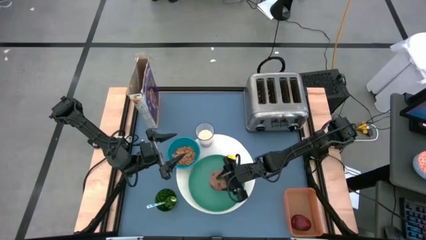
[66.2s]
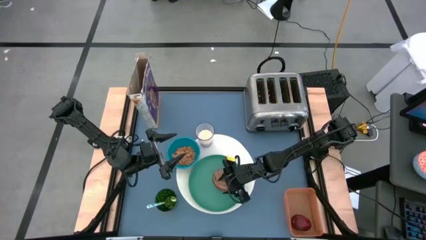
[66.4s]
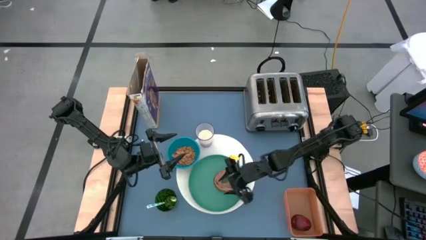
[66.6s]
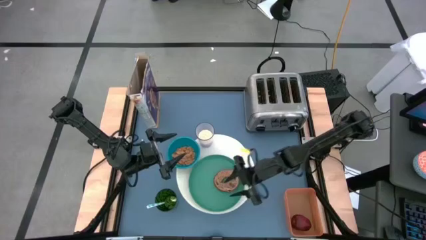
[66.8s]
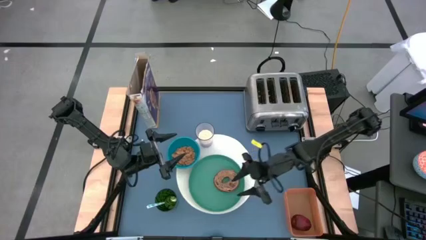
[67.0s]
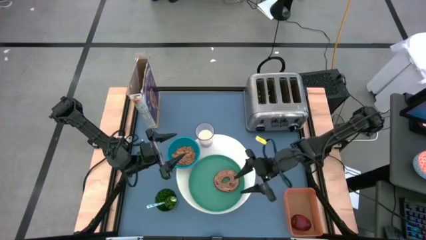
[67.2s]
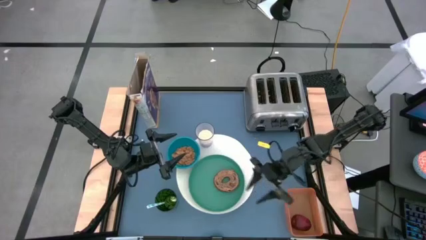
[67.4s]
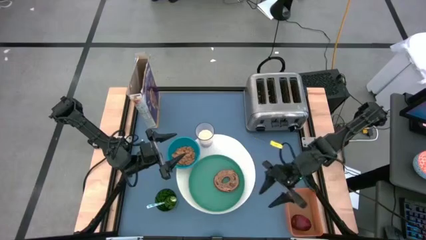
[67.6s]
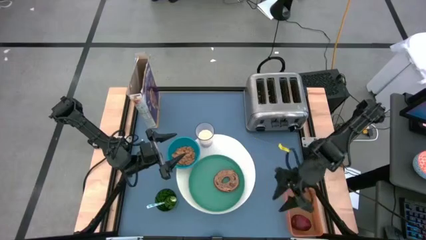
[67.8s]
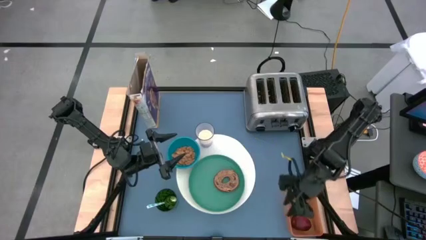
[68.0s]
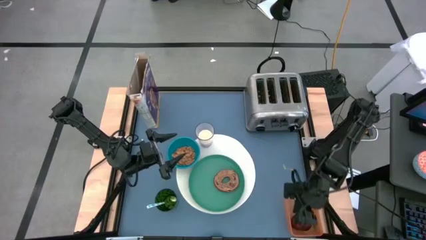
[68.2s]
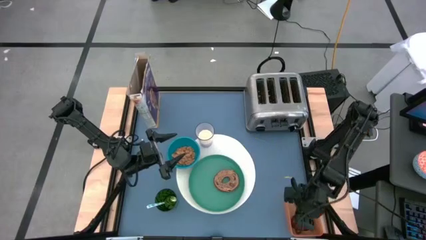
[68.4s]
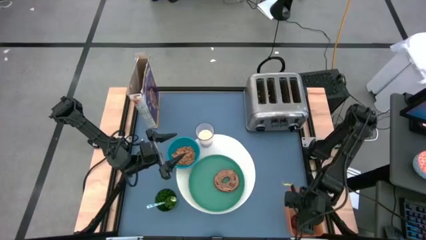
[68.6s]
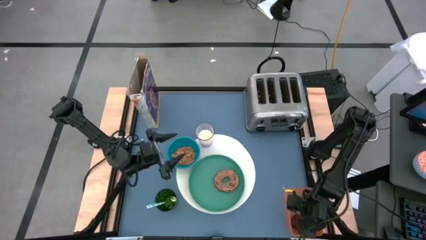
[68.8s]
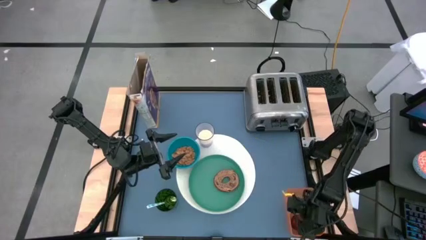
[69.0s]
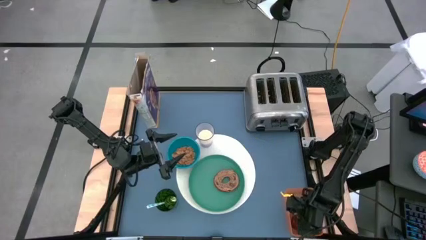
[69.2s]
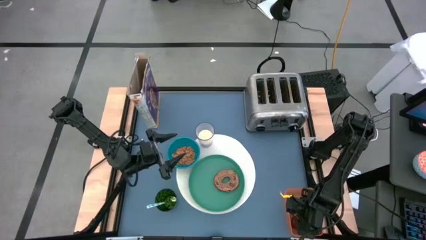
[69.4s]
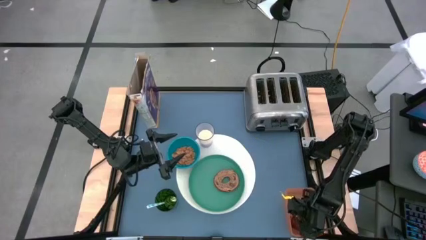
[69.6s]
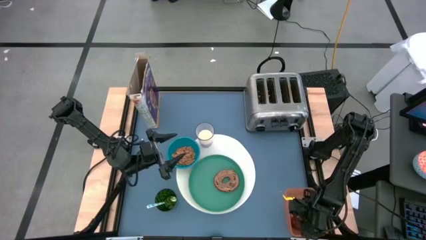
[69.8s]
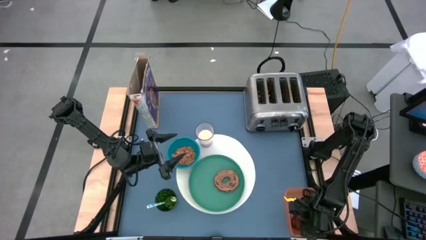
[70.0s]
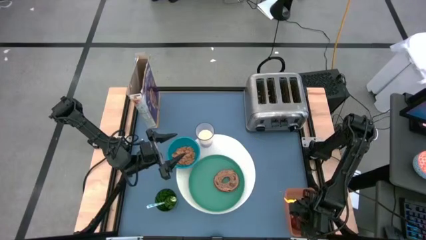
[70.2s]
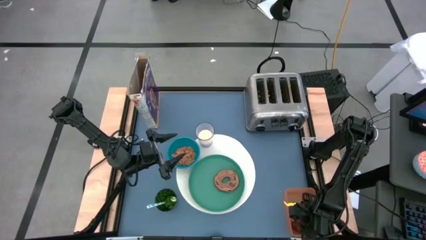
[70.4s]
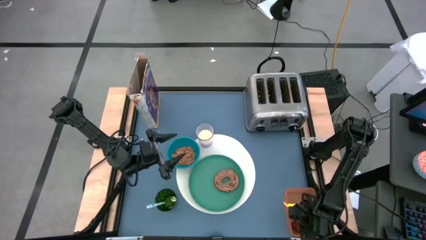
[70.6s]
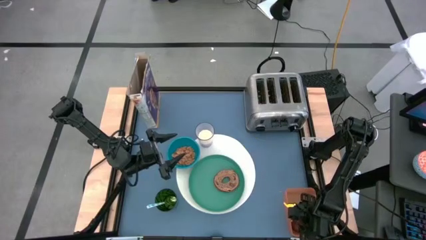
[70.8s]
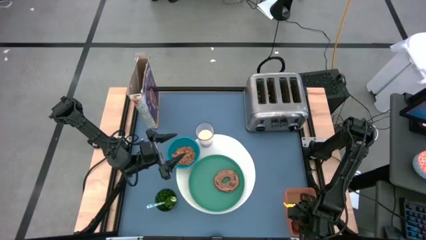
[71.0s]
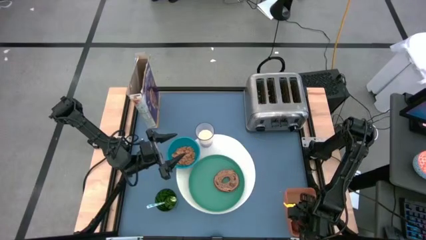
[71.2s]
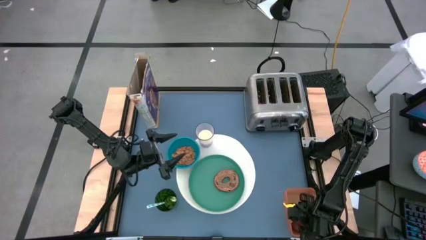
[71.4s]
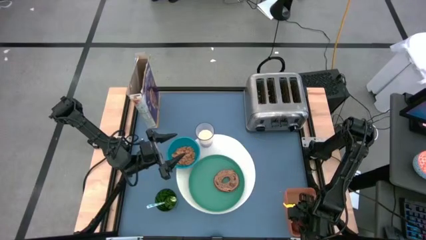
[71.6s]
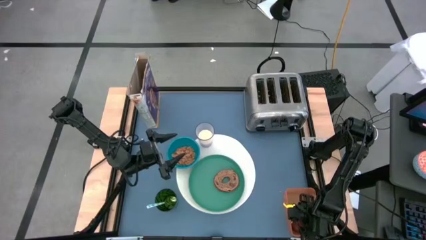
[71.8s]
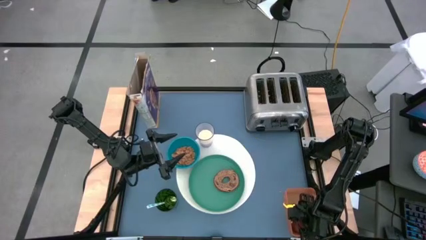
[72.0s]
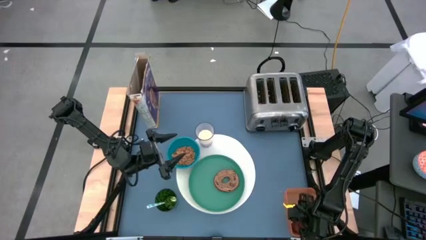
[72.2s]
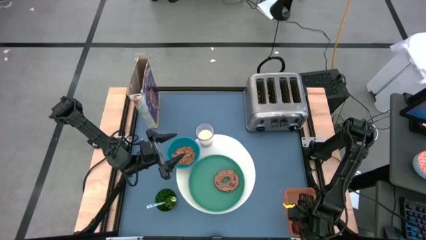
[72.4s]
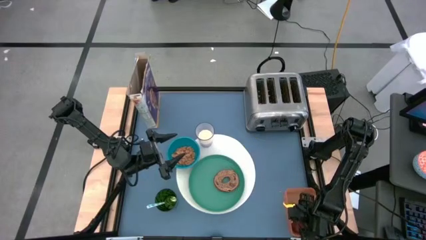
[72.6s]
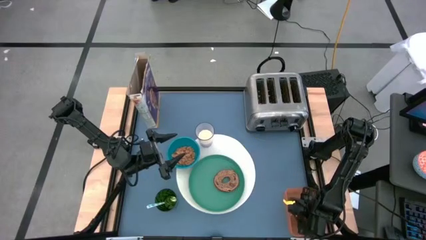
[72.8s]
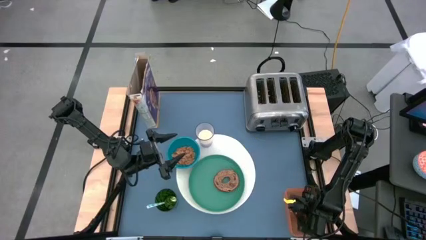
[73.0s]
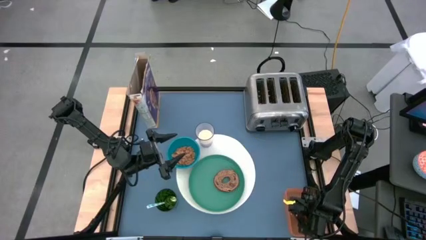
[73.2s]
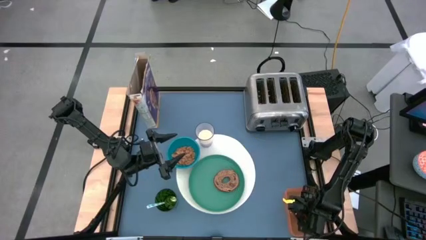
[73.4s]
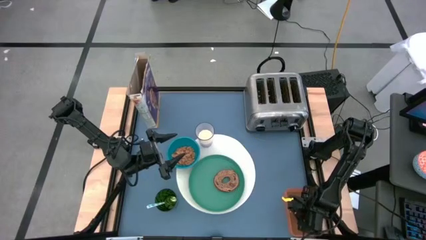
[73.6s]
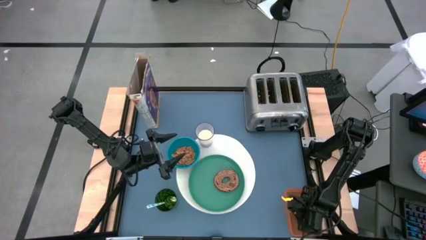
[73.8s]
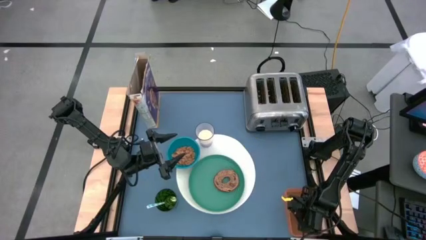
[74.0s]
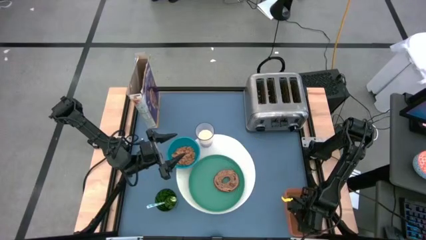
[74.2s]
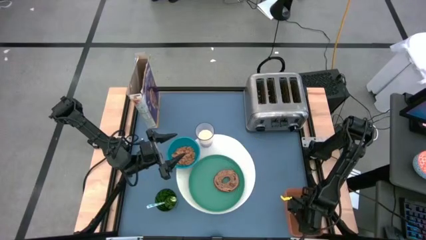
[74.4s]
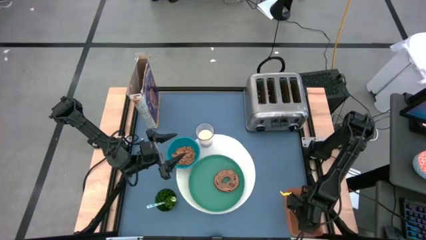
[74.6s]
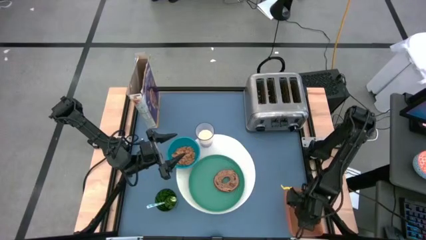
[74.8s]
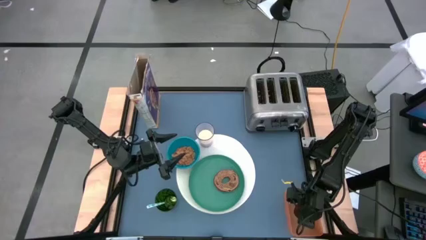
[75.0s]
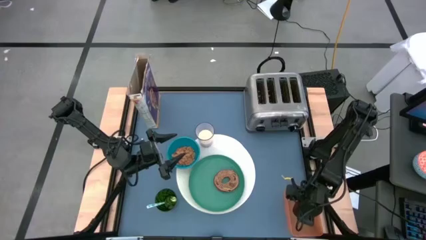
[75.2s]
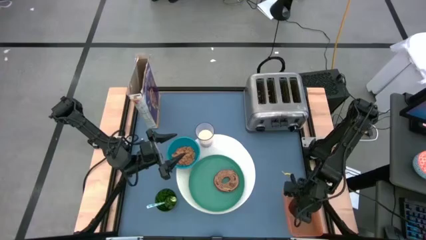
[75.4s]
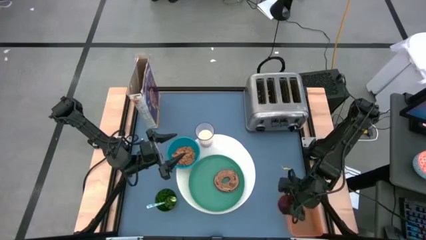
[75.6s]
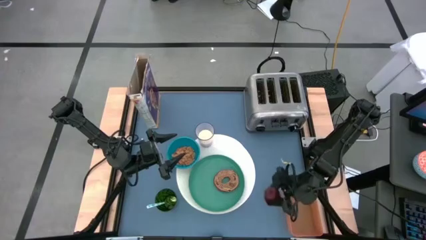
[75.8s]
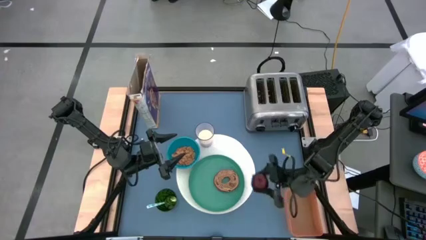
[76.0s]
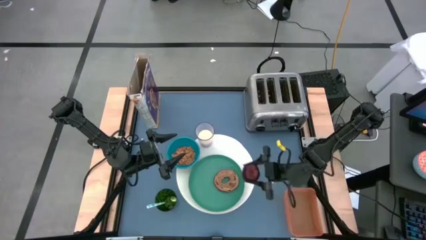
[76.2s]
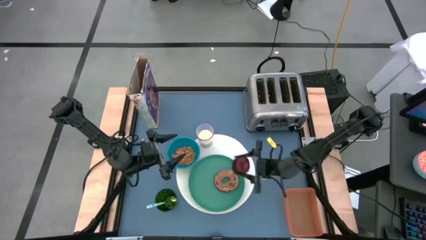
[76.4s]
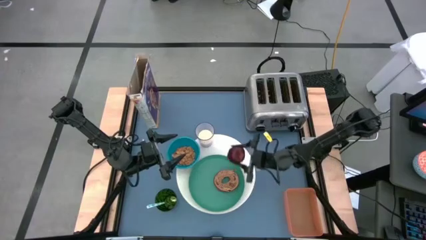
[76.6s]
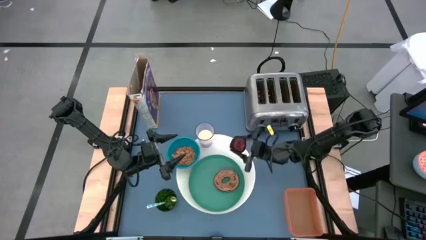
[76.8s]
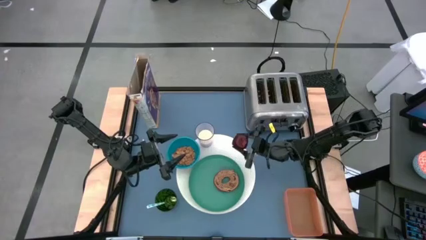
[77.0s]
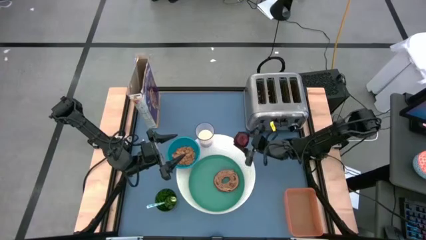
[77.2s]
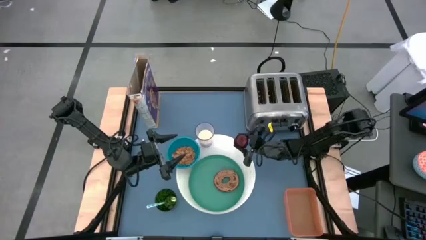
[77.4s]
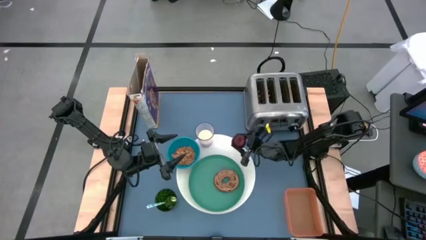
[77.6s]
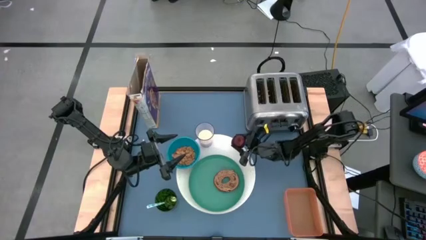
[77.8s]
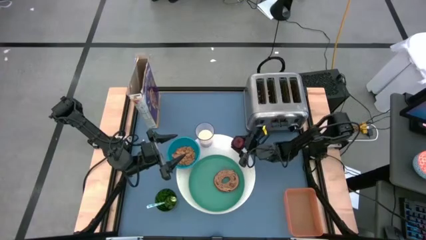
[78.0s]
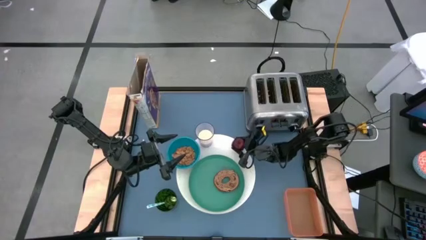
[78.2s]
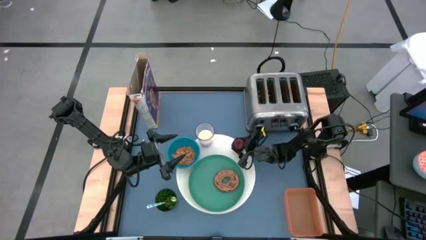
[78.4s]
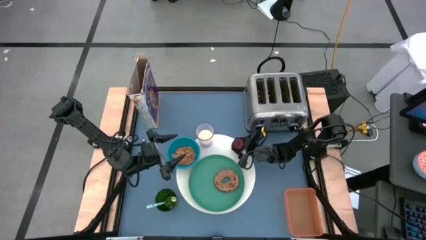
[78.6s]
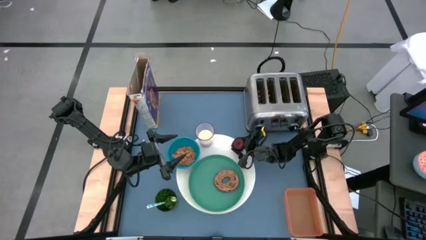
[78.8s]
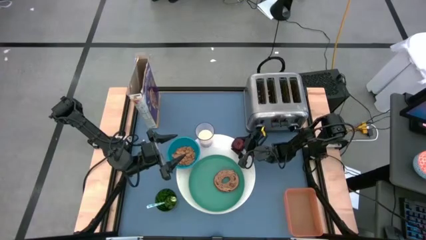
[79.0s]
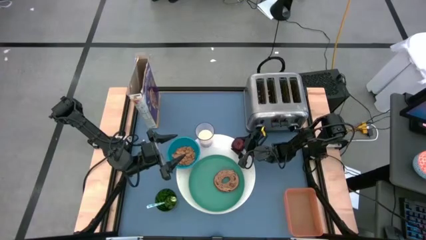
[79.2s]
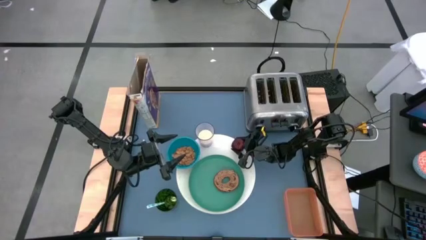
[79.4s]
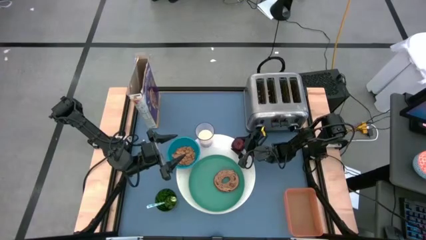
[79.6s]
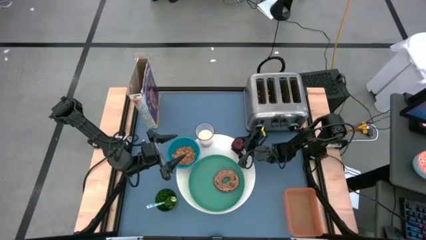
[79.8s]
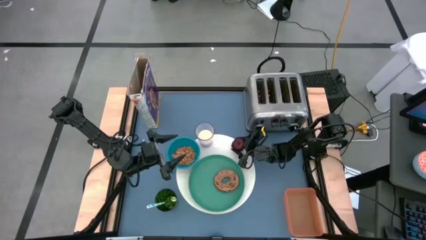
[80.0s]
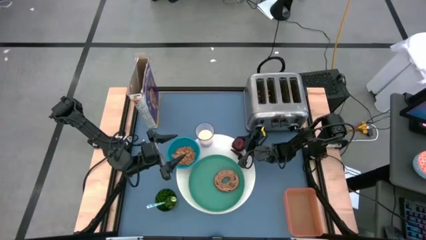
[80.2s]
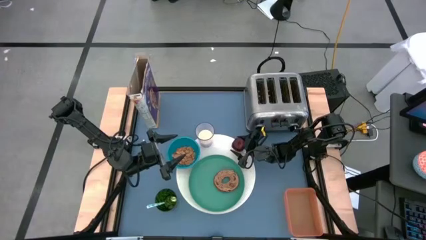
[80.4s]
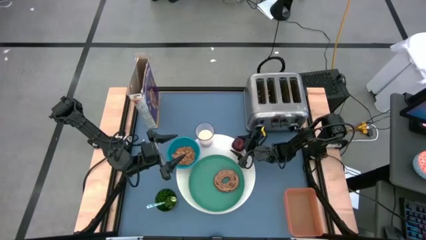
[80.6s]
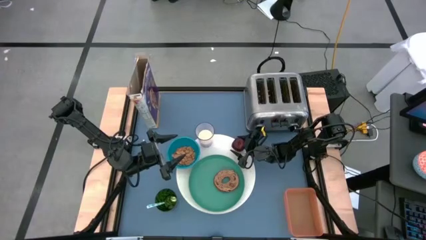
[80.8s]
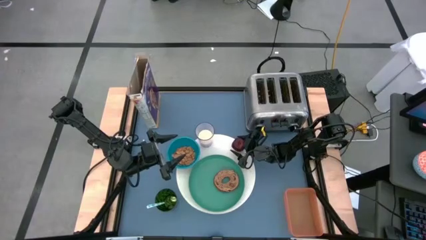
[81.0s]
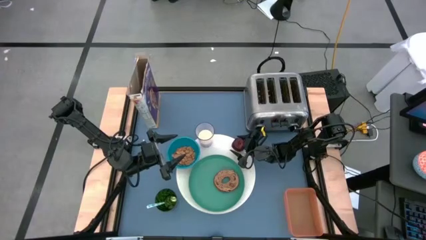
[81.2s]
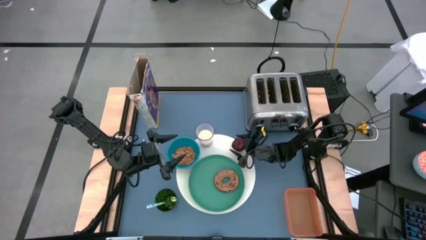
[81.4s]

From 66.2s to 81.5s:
Task: Arrange a breakfast setting
Put the red apple on the white mat to the top left of the green plate

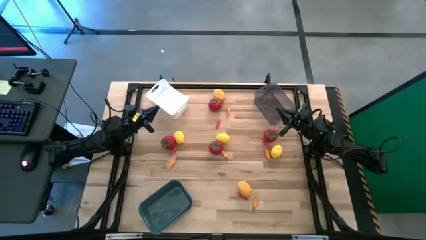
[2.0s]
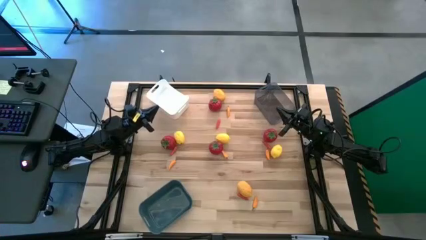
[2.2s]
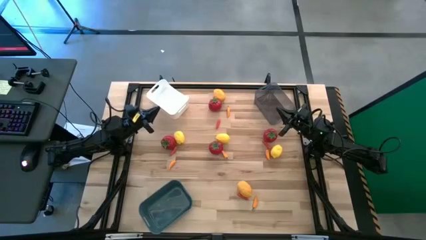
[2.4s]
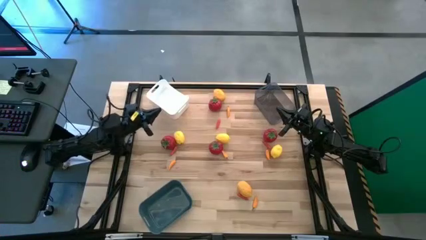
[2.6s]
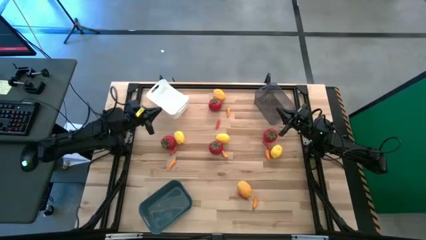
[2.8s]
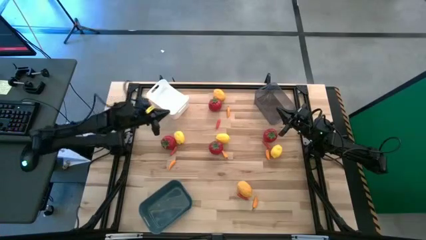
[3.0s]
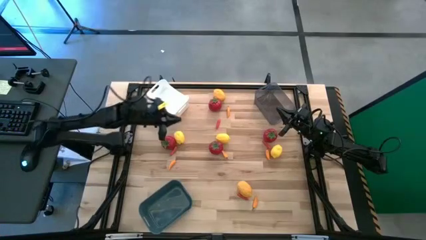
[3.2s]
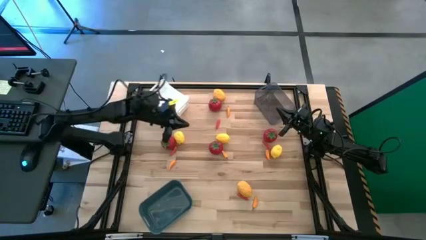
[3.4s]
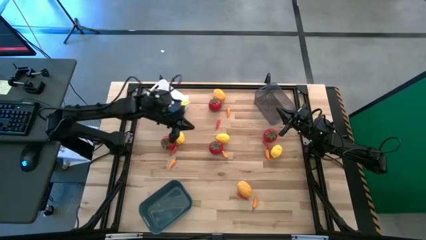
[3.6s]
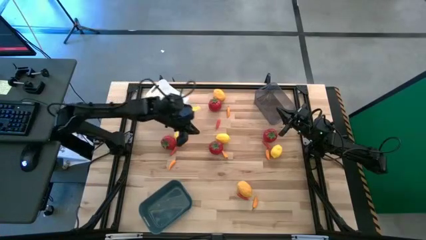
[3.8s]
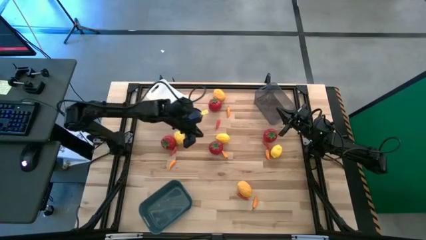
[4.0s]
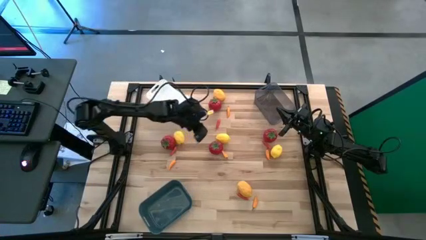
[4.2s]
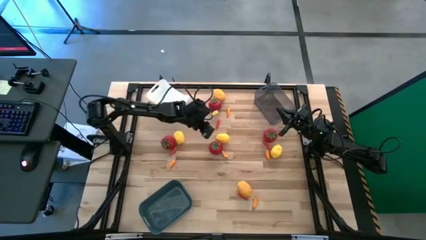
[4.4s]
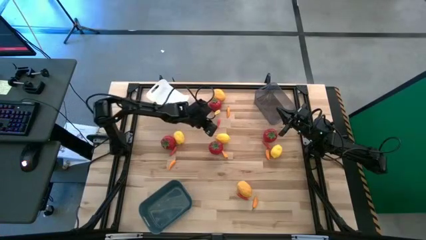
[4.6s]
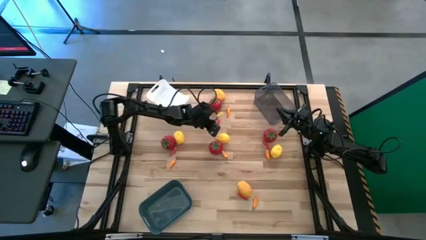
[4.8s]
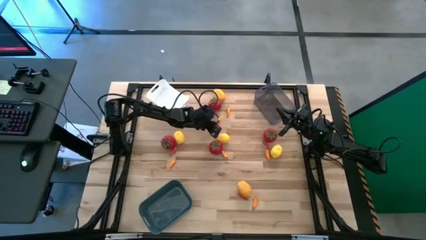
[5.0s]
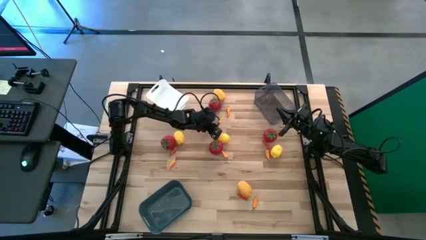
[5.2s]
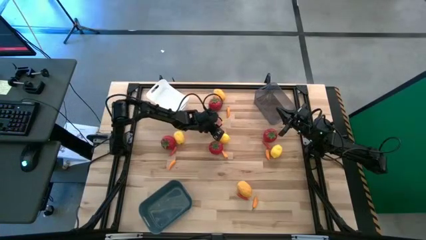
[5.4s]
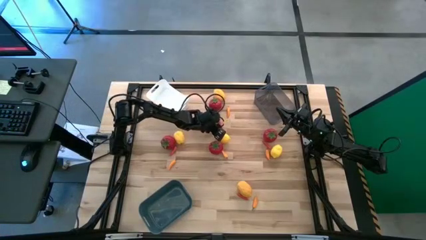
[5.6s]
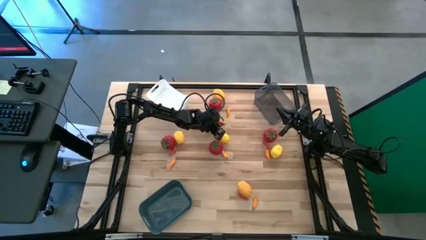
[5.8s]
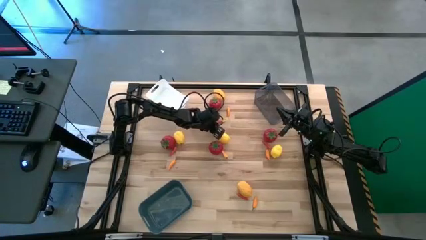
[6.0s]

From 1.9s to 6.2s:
Task: Sort produce into baskets
Put the red chili pepper into the black transparent bin
